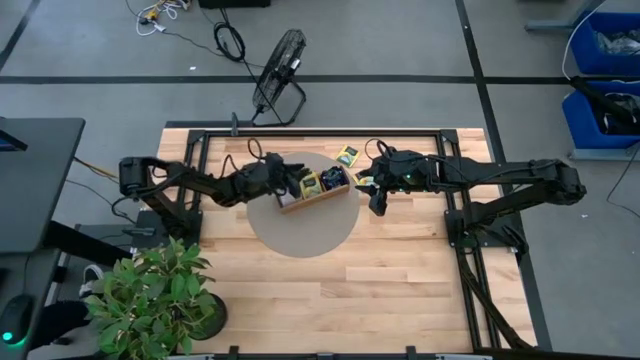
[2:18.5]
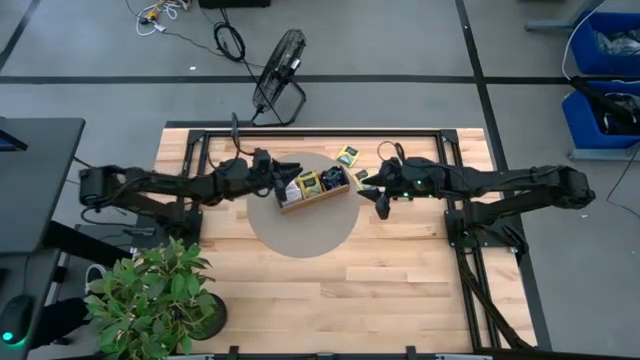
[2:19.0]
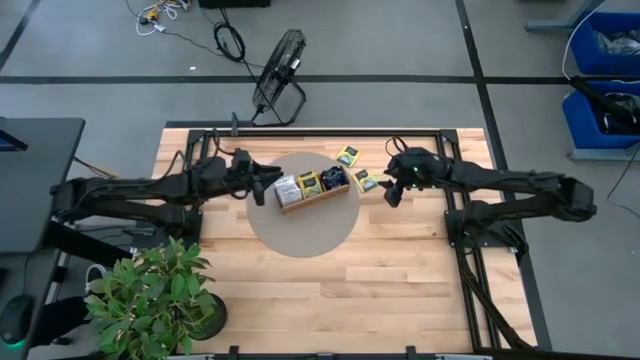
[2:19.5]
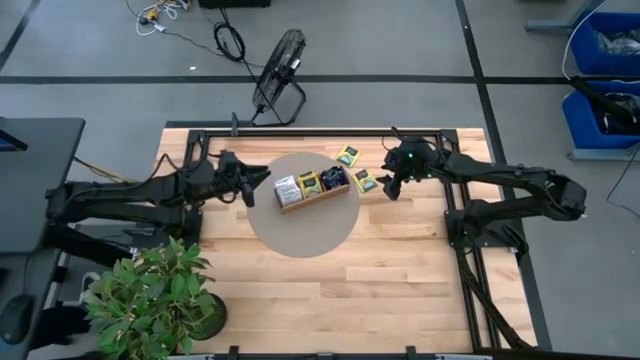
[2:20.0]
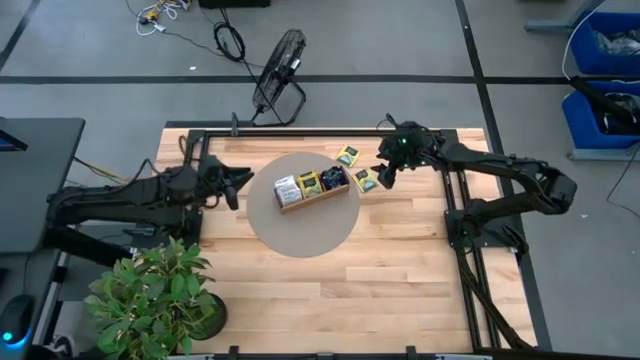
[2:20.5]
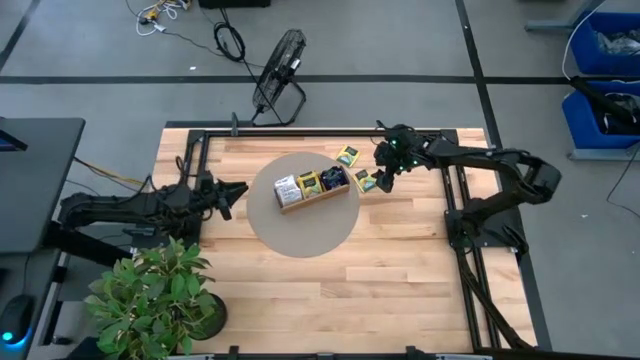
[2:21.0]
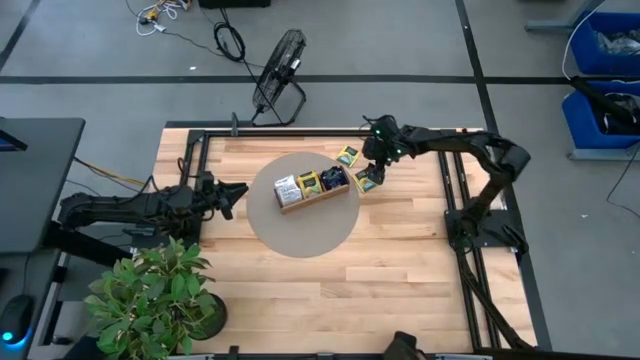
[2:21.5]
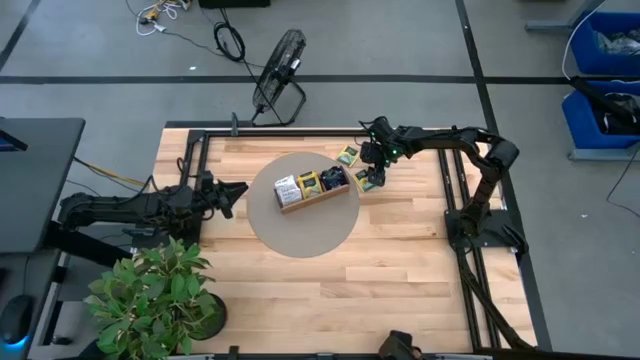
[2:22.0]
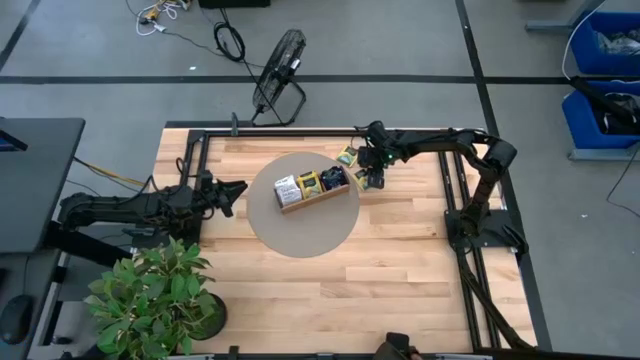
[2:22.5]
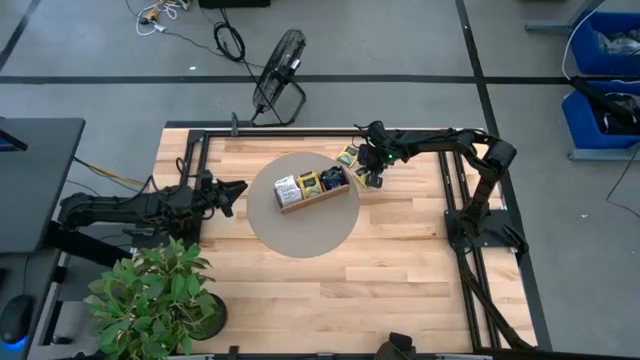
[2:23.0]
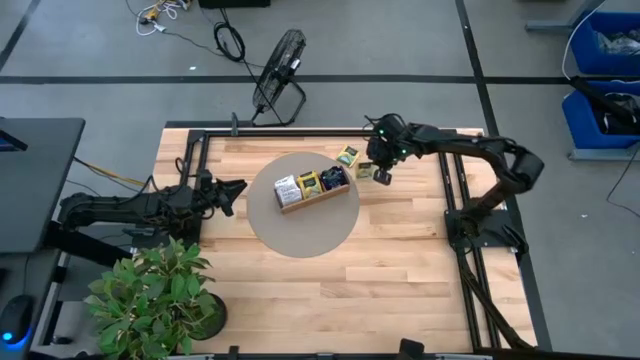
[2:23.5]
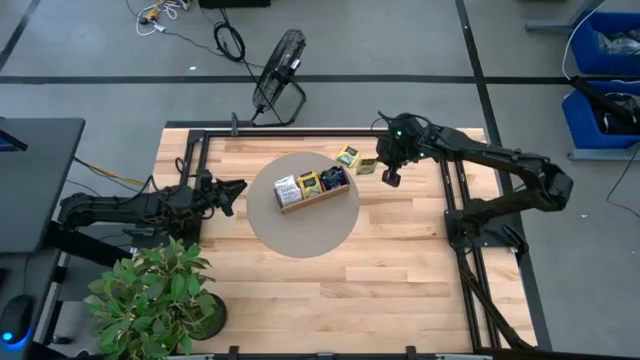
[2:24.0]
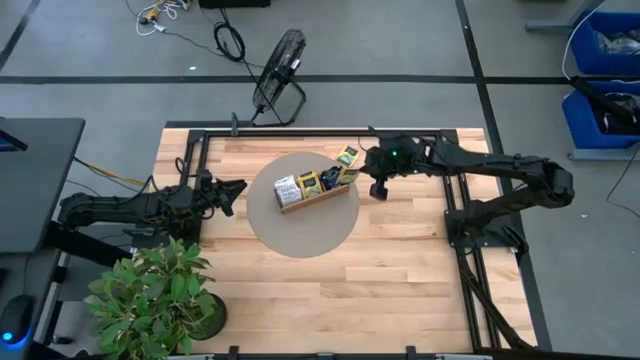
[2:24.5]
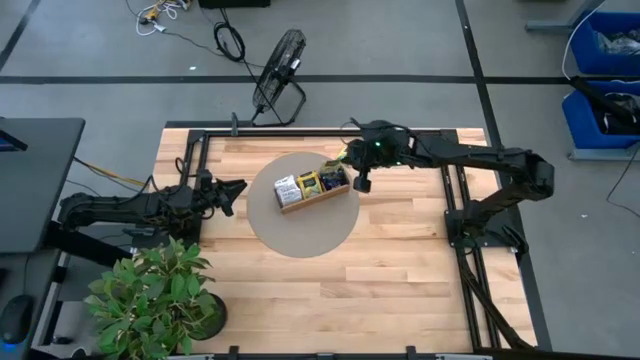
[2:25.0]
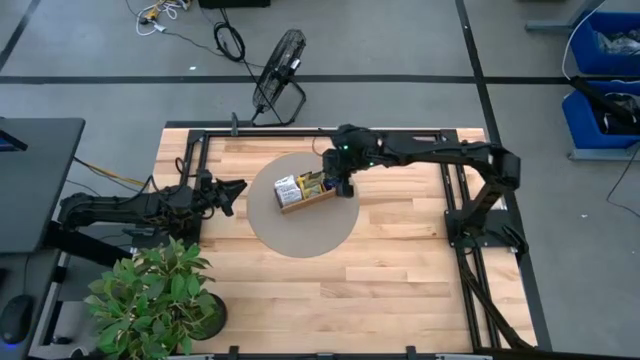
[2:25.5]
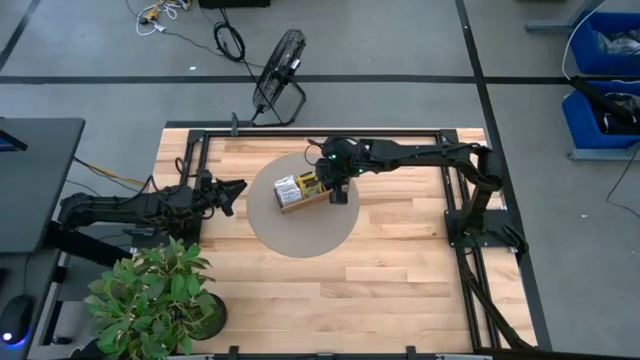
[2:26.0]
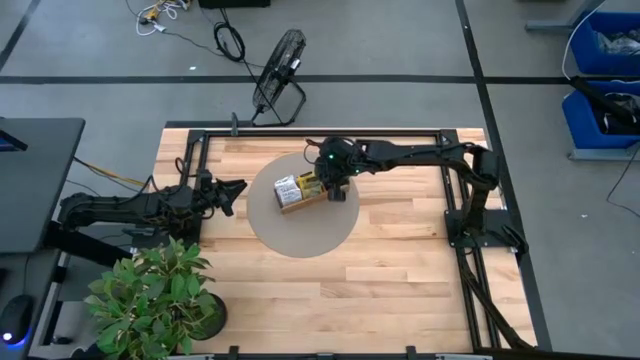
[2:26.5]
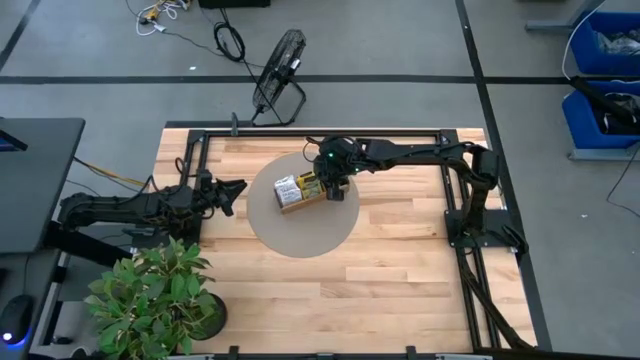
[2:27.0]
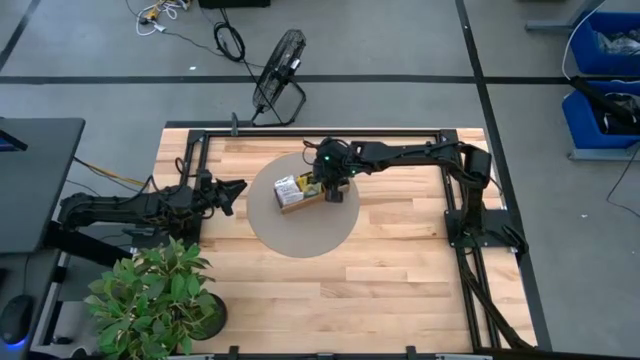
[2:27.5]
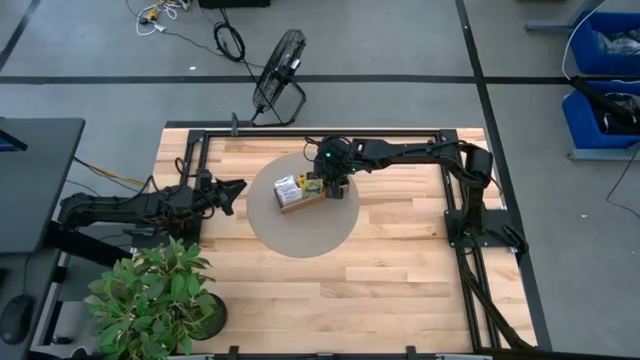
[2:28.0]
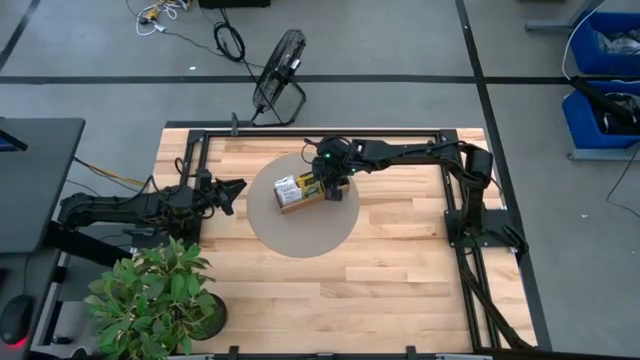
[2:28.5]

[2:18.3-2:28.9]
Task: Pick & Place Tea
Put the yellow tea bag into the middle section of the wooden organizer

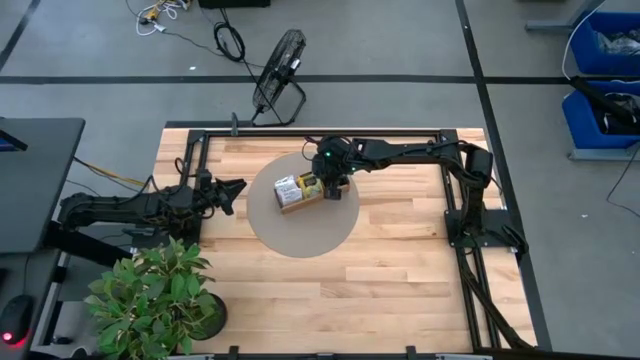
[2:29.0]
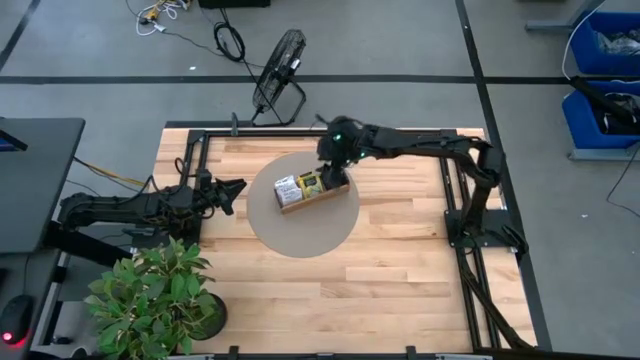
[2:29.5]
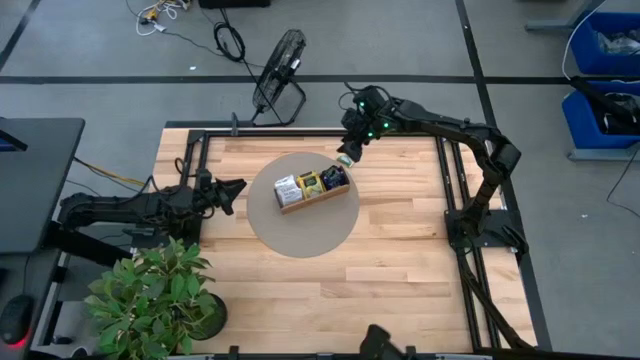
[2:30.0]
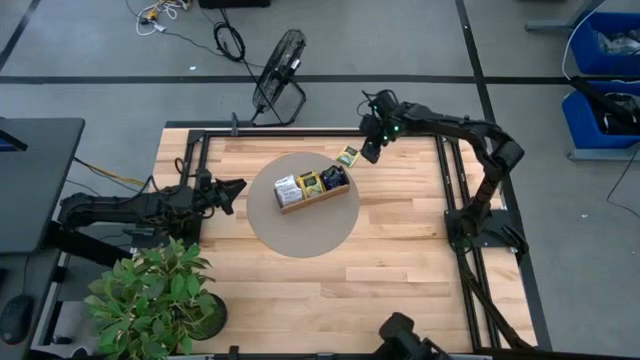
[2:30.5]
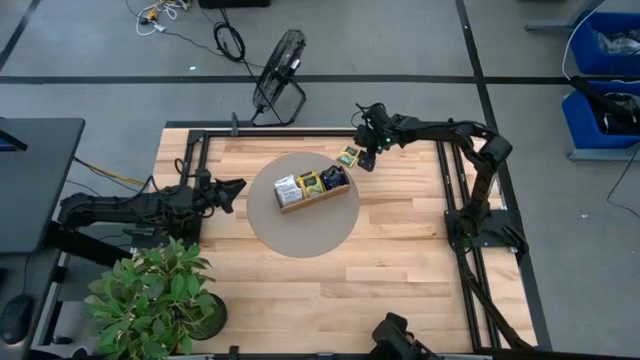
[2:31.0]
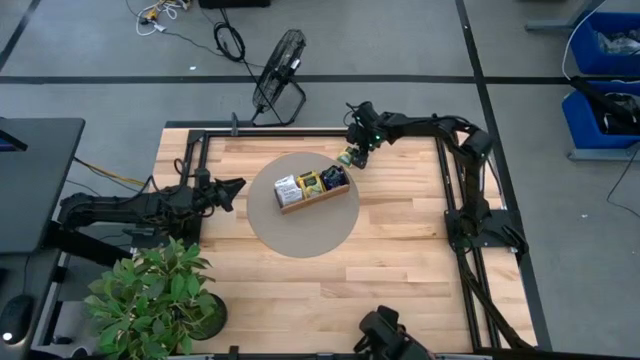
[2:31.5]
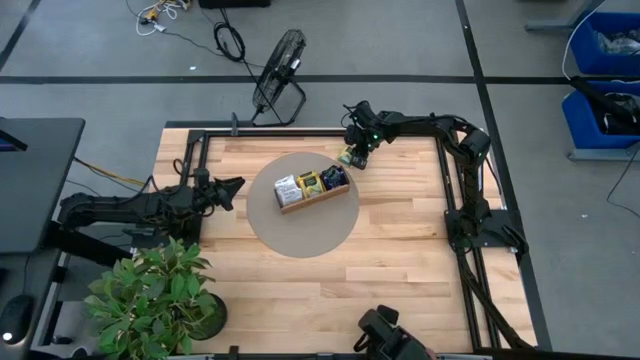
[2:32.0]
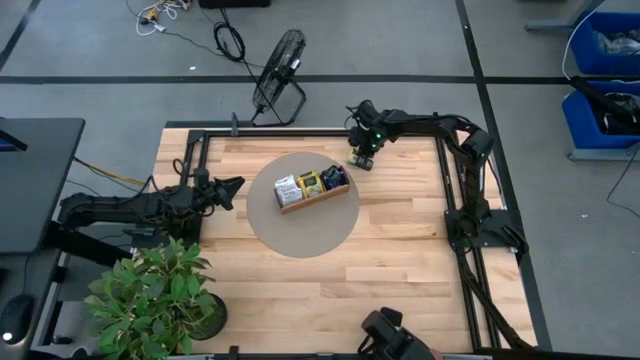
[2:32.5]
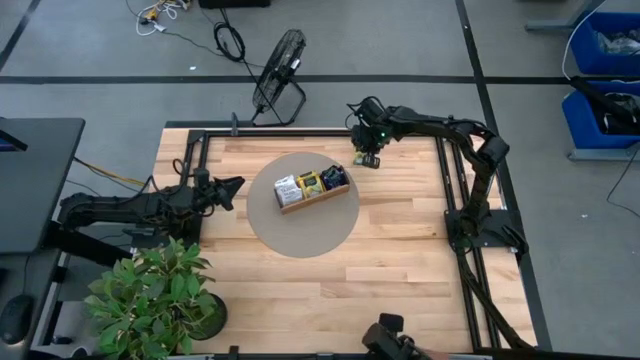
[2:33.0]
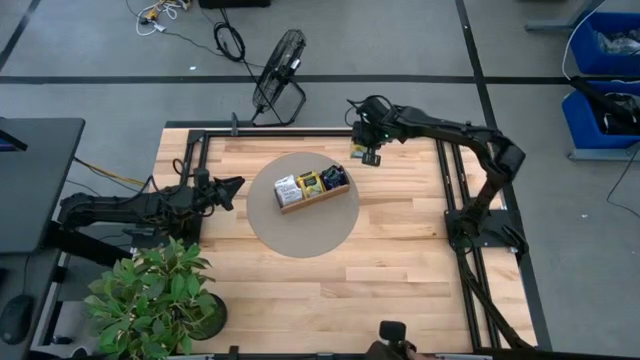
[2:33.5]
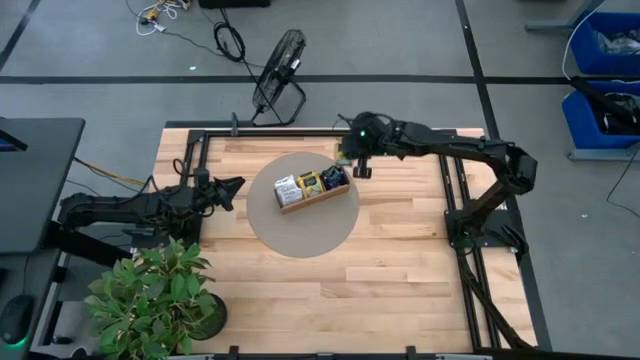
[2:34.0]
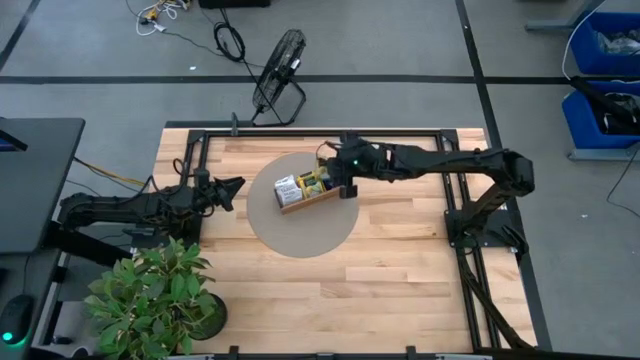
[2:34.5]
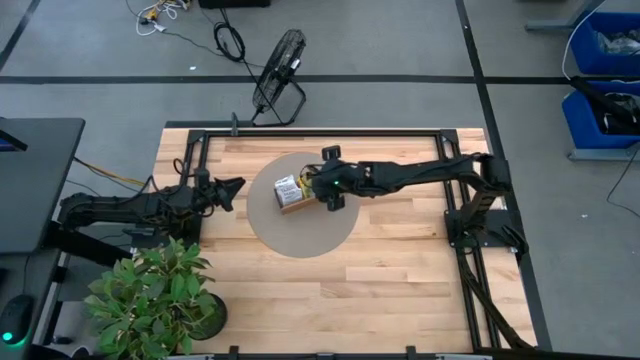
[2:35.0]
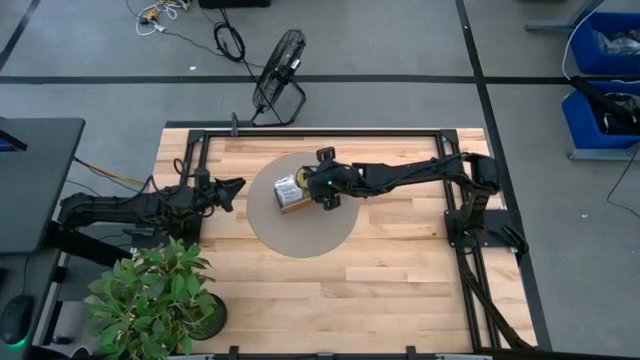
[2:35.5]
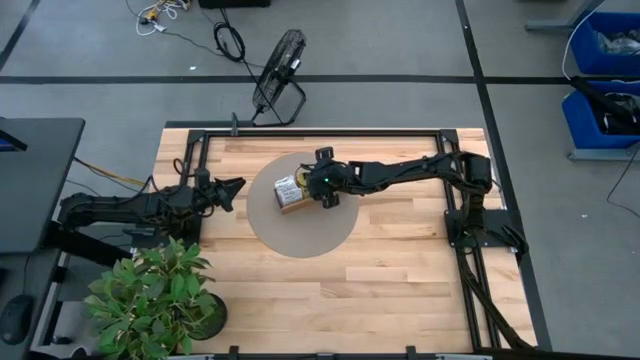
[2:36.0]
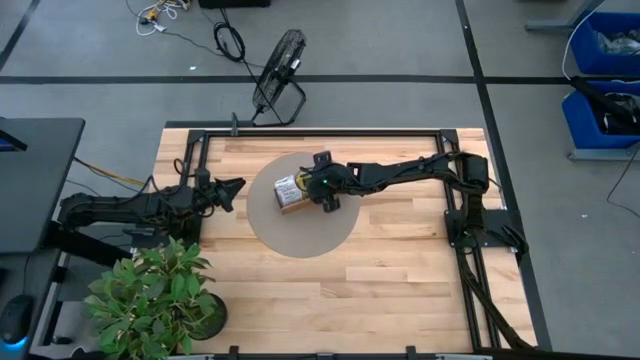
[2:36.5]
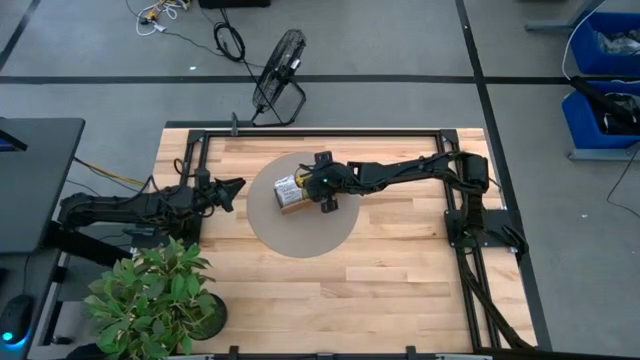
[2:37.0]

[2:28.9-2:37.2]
Put the yellow tea bag into the middle section of the wooden organizer

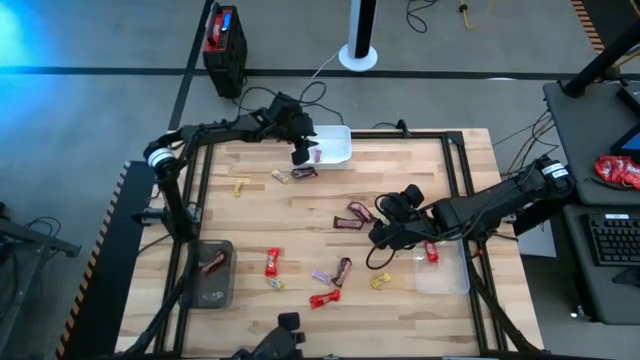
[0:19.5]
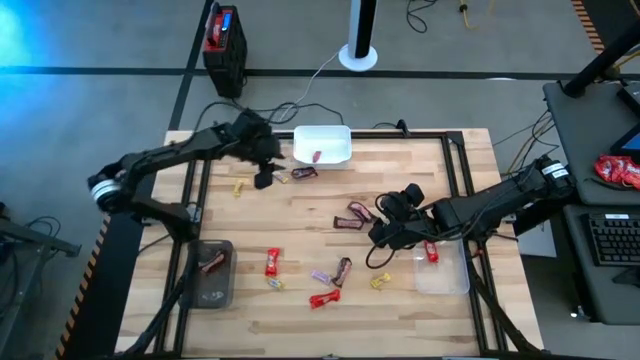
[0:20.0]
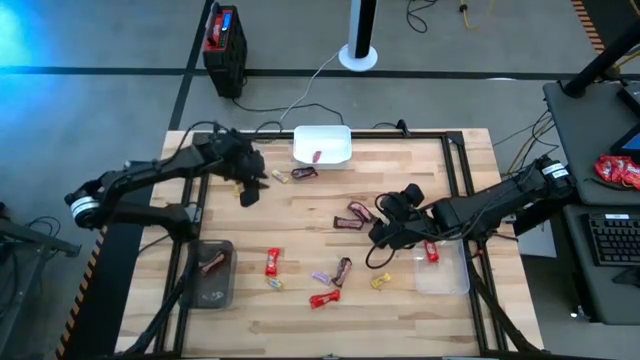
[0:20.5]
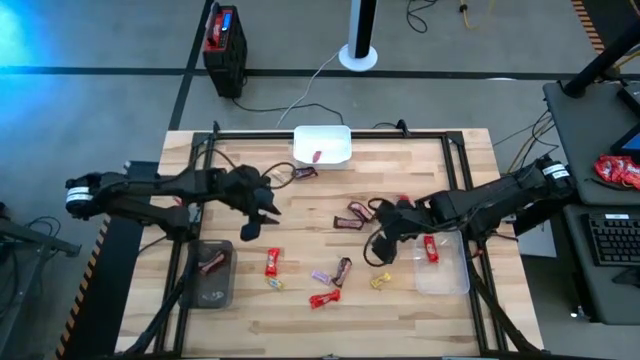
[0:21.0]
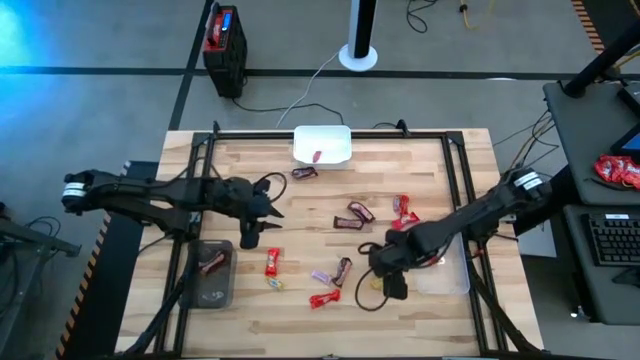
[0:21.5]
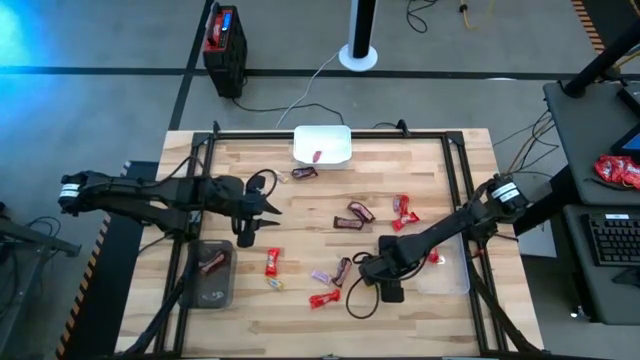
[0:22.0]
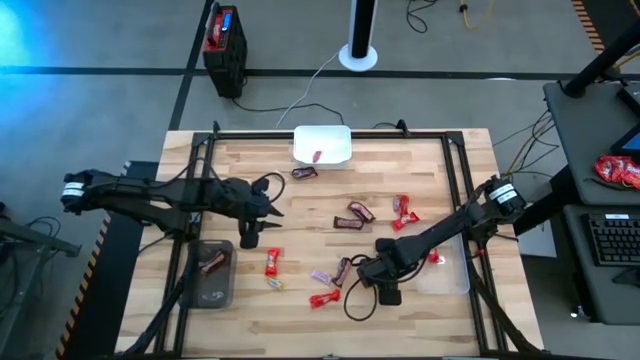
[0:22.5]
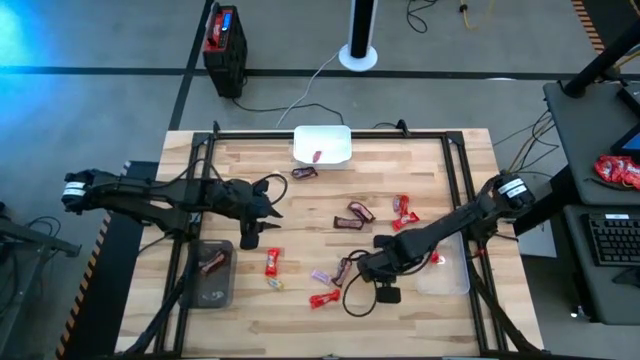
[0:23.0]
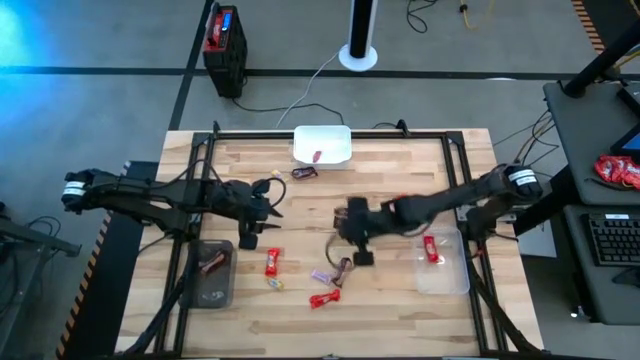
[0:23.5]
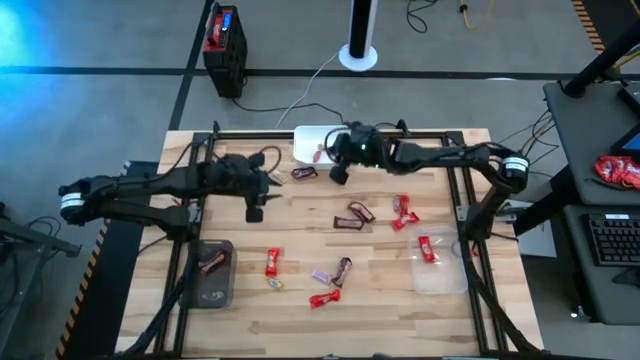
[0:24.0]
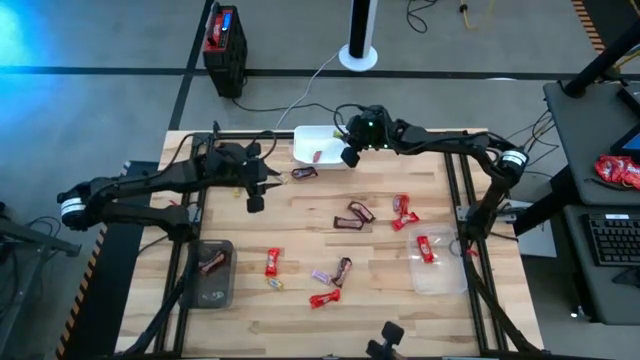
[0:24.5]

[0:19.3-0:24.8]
Task: Sort candy by brand, put in halloween buckets
Put the yellow candy into the white bin
